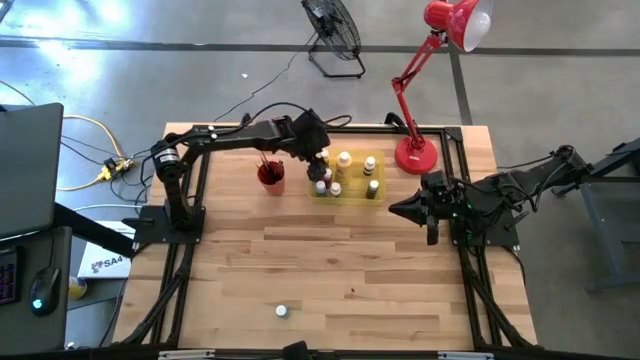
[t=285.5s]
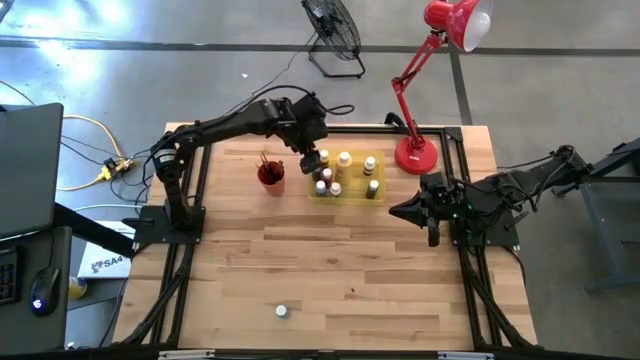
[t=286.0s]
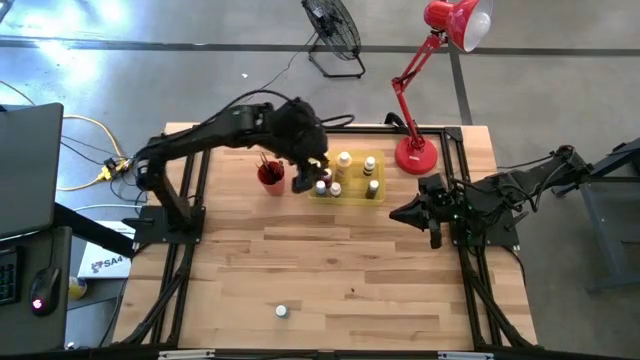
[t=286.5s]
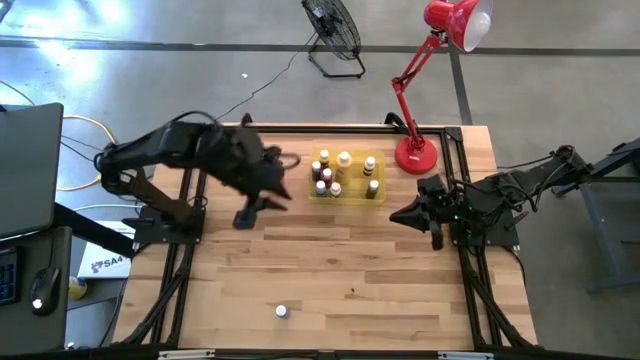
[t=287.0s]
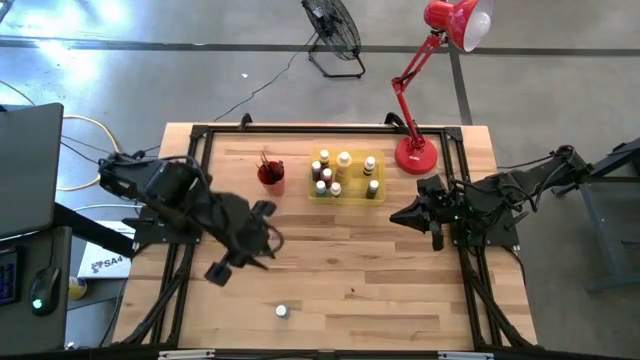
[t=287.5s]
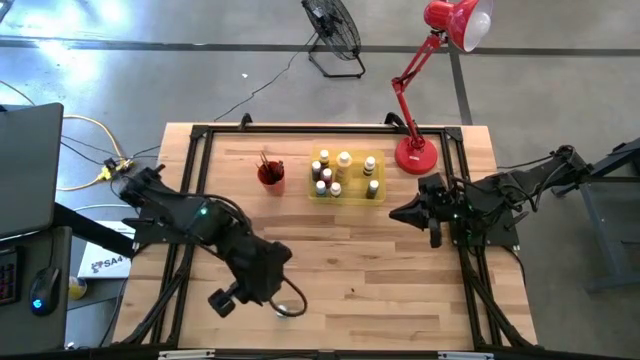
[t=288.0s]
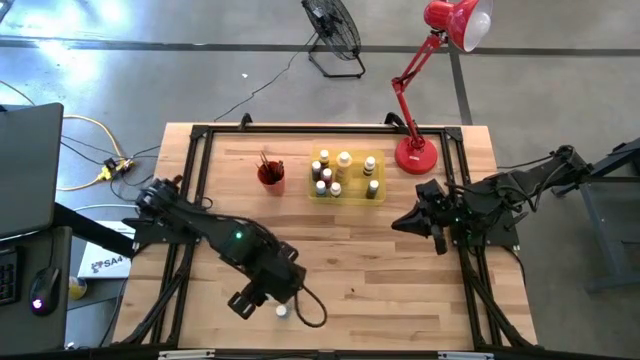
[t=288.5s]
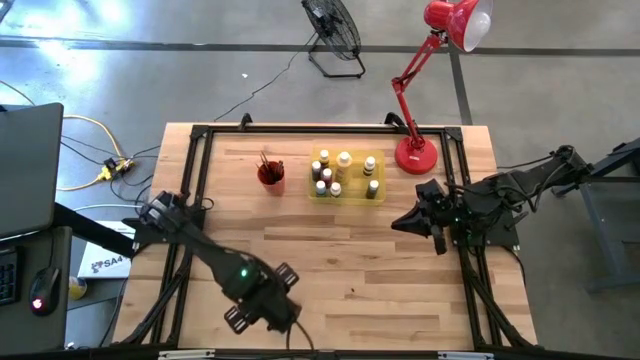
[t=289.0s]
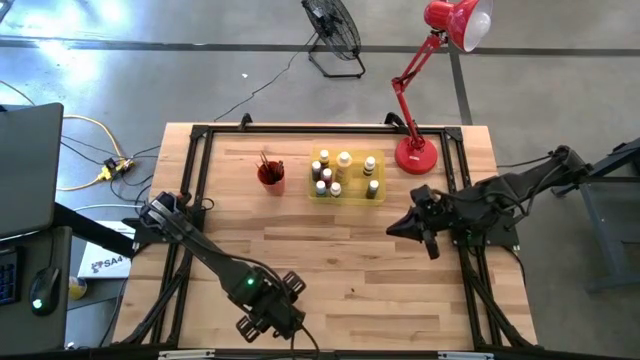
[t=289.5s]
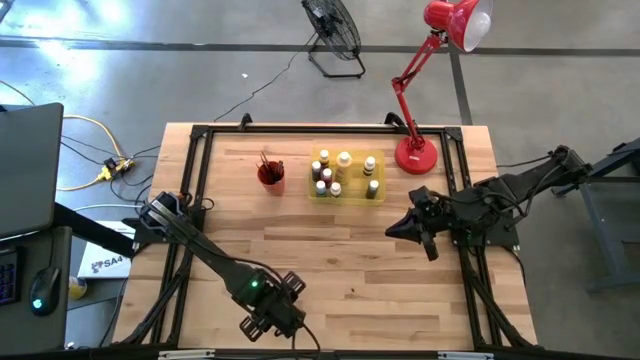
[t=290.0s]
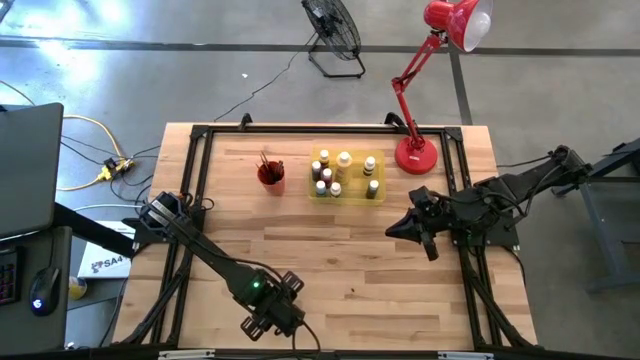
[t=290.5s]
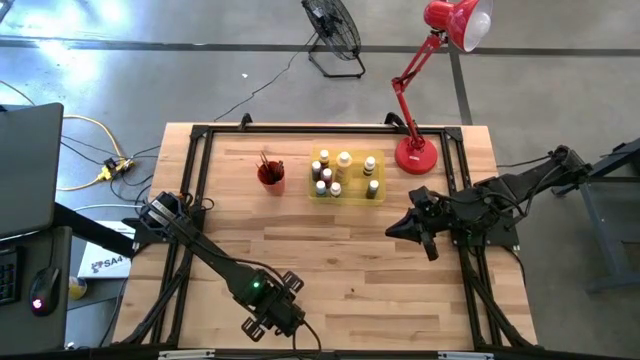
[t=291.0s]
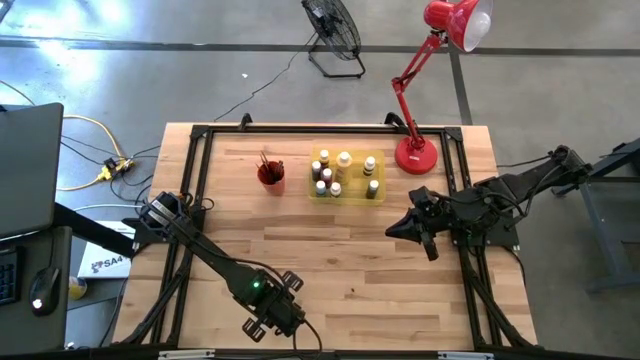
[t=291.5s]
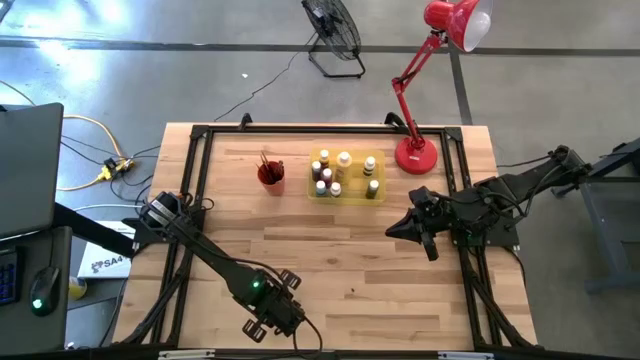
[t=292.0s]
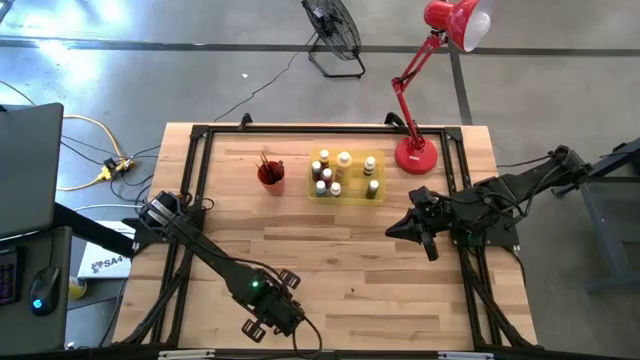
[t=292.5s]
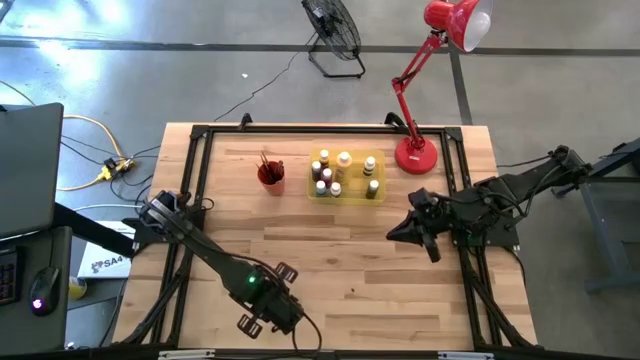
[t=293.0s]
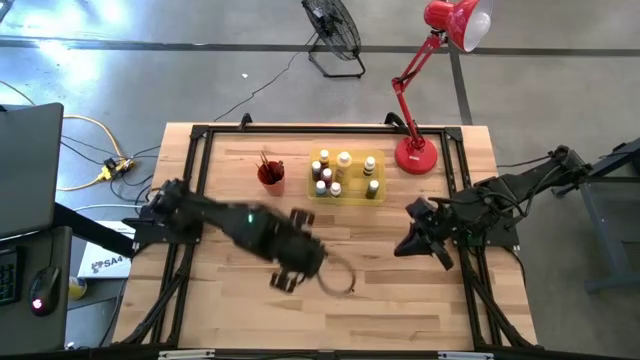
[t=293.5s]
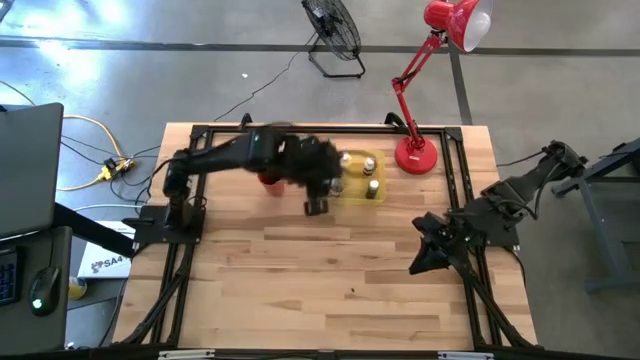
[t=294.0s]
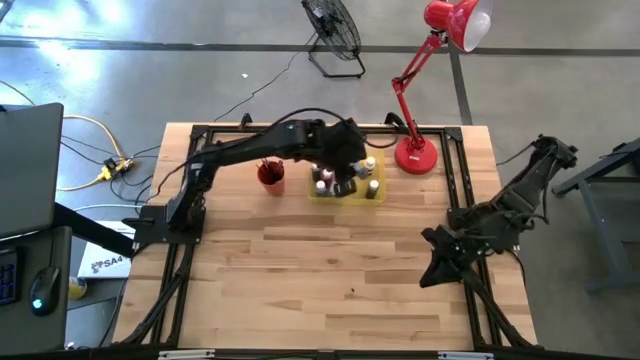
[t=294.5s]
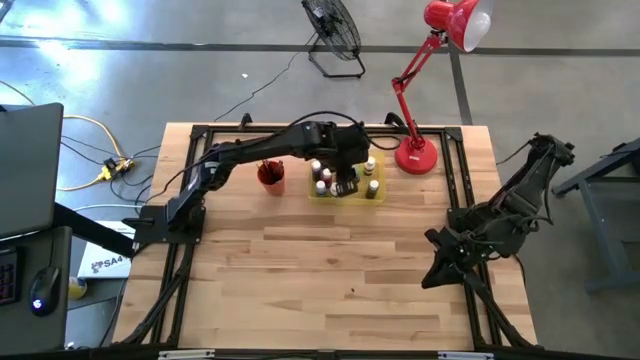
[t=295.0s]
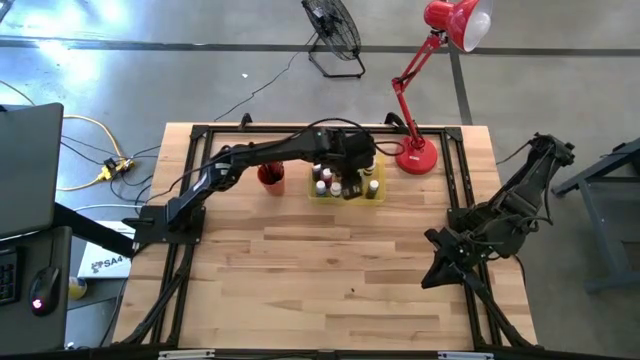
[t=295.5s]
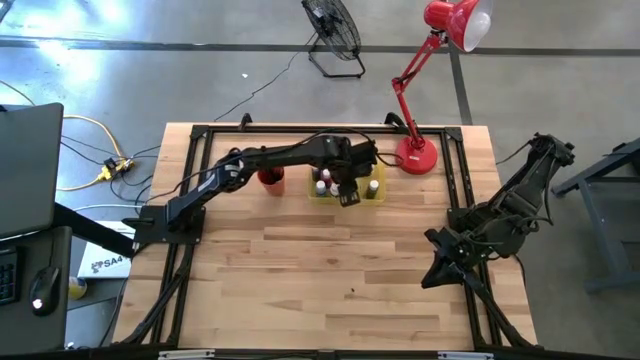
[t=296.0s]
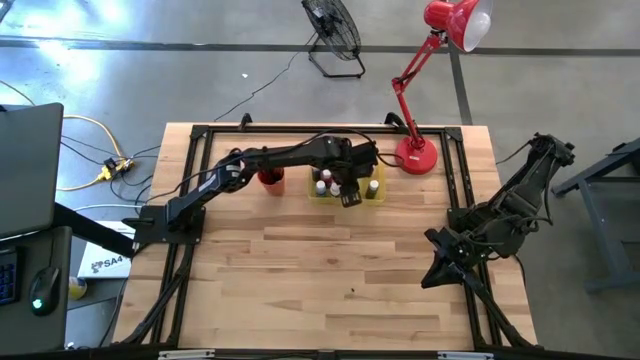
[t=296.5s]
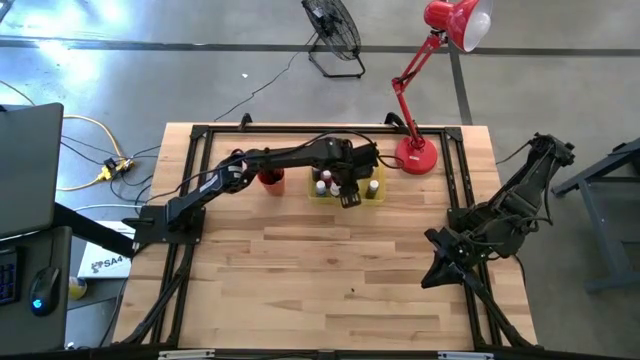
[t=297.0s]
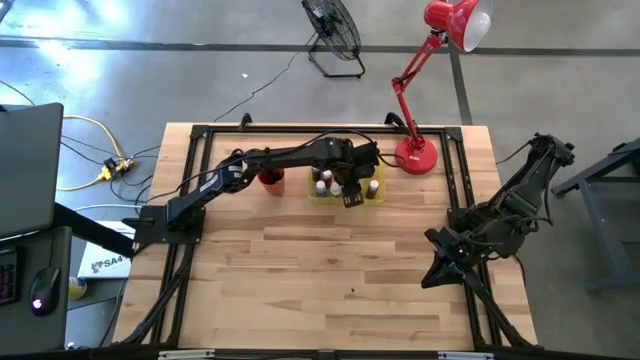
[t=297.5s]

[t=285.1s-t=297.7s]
Task: Pick & Place Paint Supplies
Put the light blue paint bottle into the yellow bin

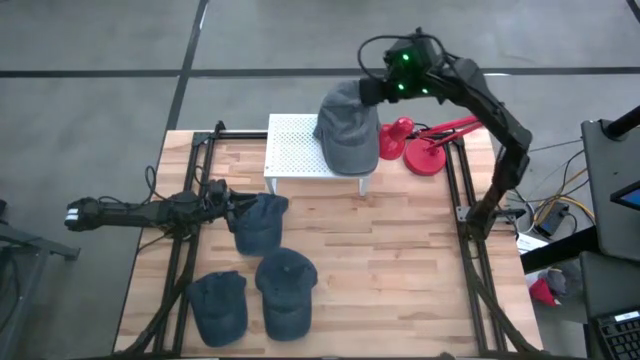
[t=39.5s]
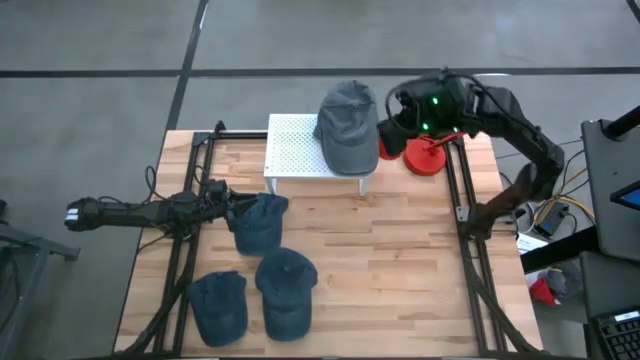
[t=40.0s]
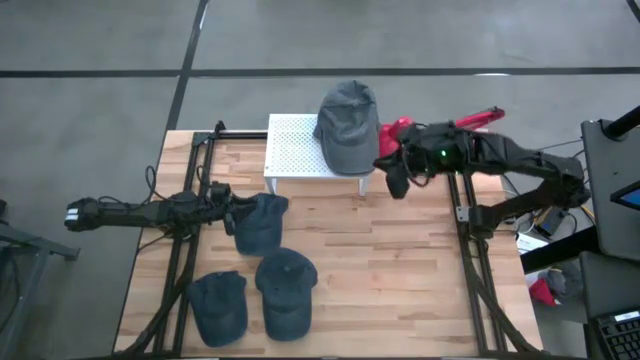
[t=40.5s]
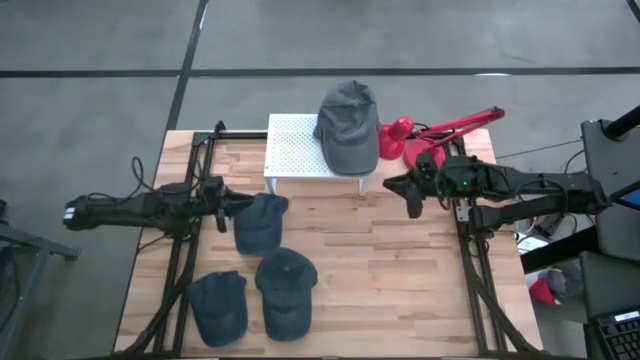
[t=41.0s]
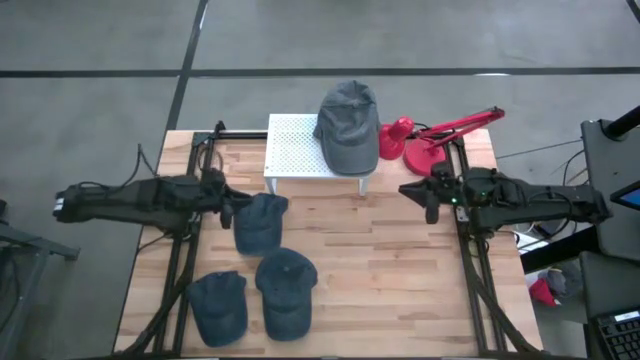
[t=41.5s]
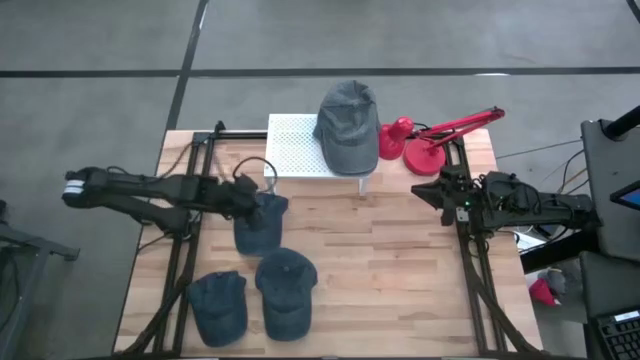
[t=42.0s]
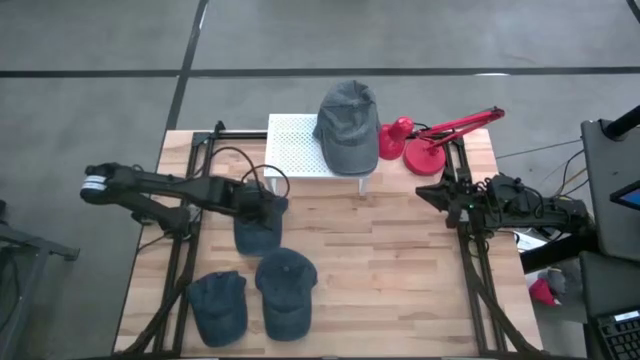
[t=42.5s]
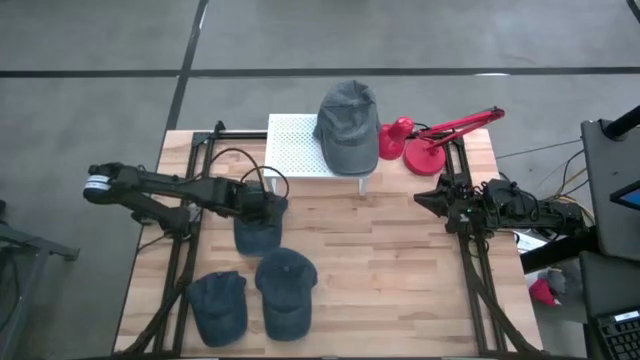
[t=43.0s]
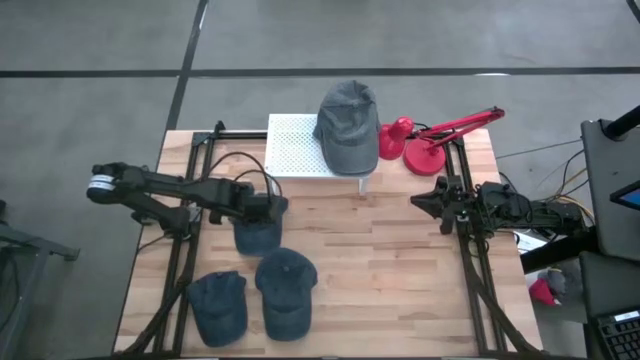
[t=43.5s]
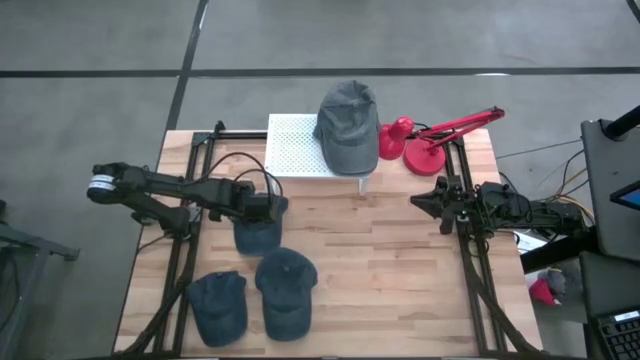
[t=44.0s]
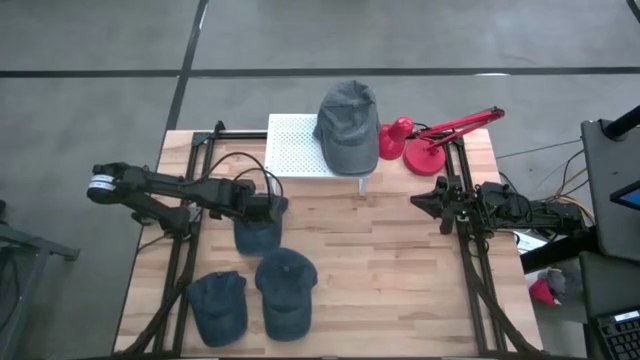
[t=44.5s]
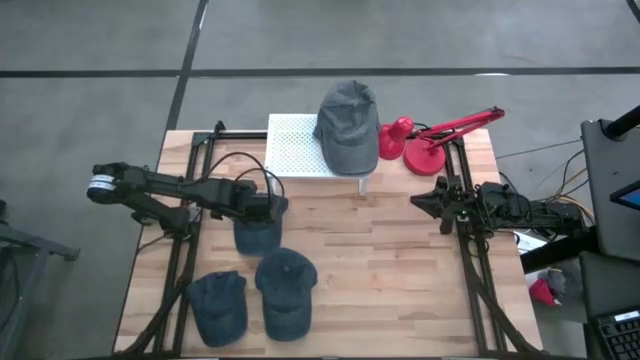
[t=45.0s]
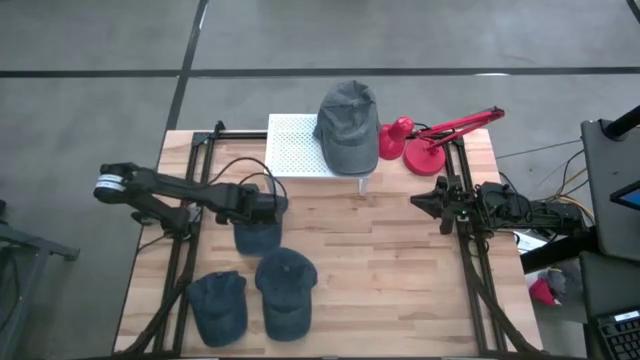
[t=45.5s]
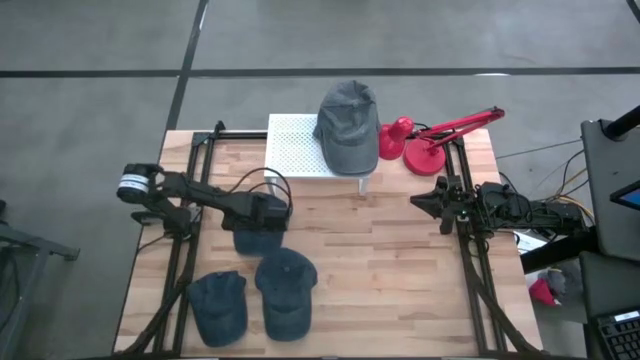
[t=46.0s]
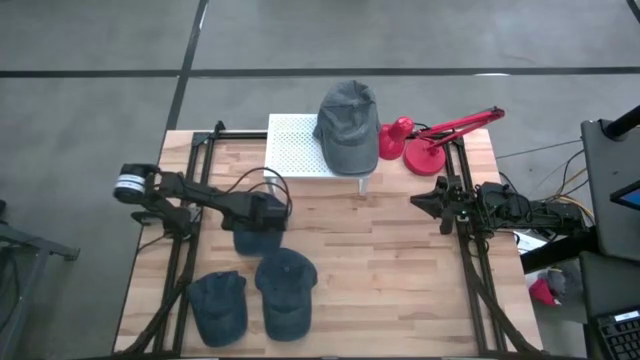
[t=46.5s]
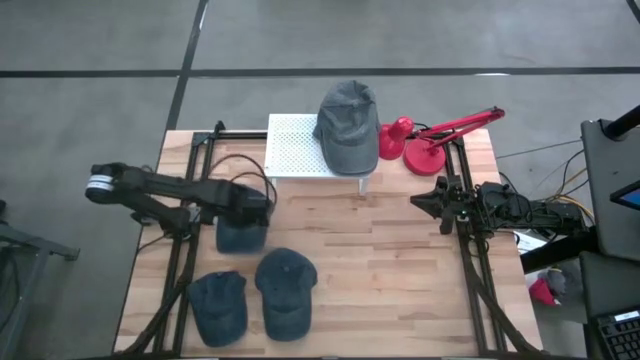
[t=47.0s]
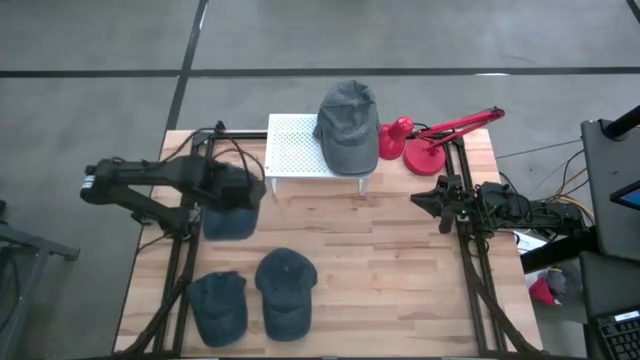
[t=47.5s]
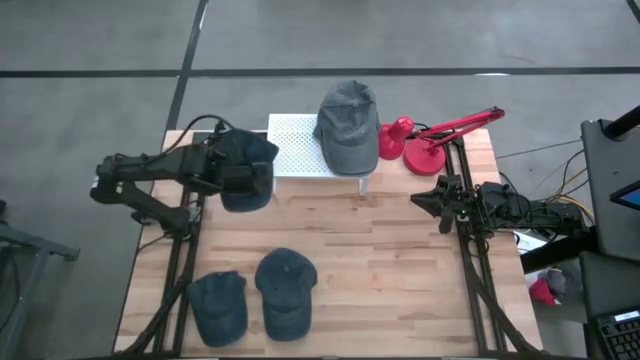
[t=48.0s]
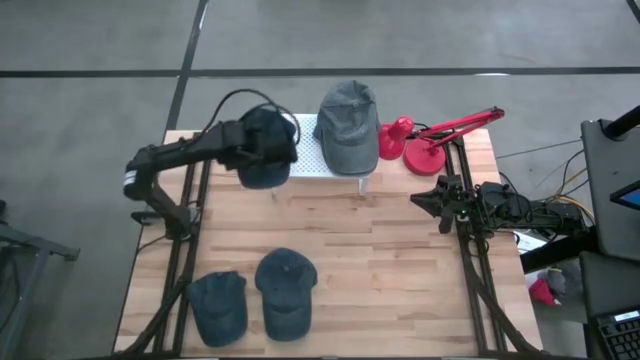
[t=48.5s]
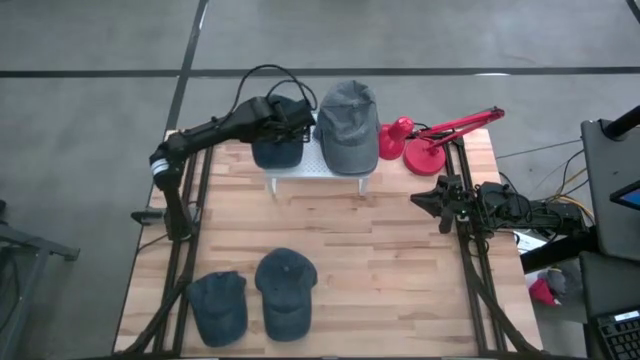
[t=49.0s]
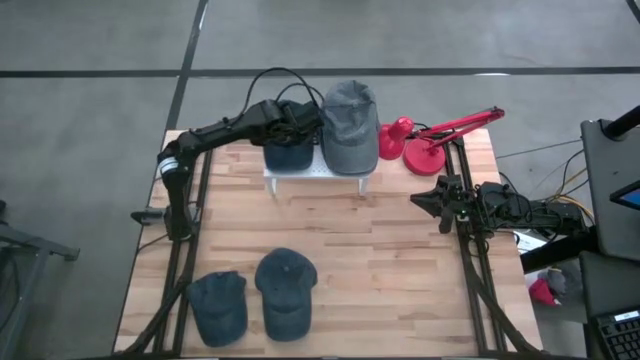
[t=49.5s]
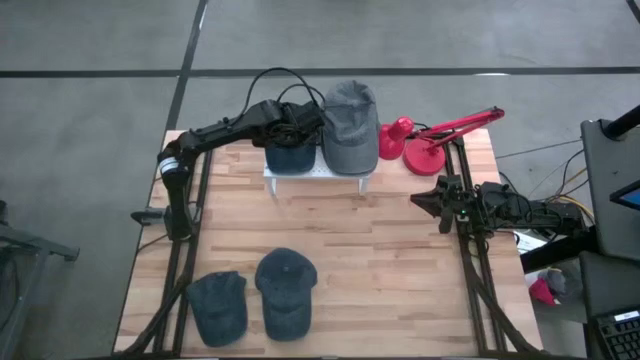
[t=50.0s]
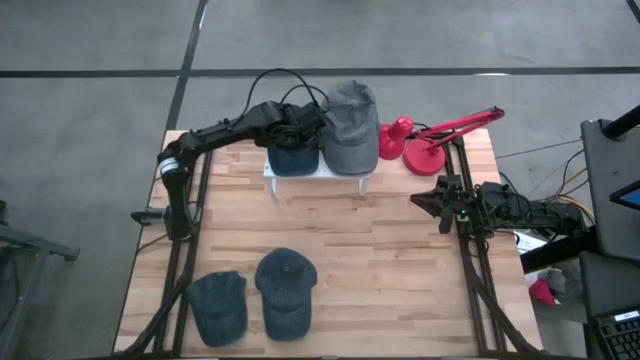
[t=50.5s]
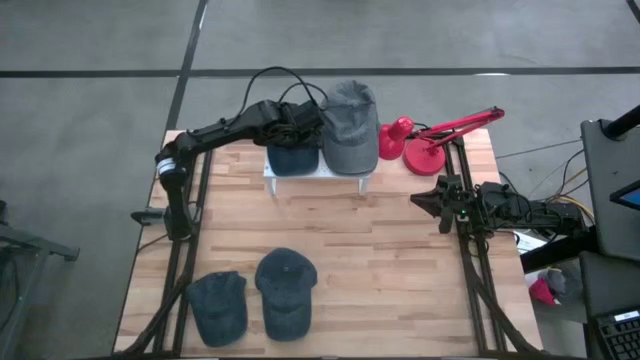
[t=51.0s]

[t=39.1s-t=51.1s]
Task: Pick & Place hat
Put the top blue cap on the shelf
